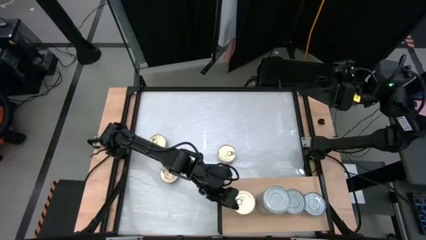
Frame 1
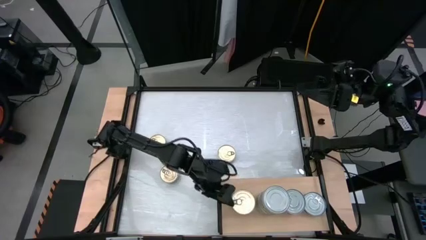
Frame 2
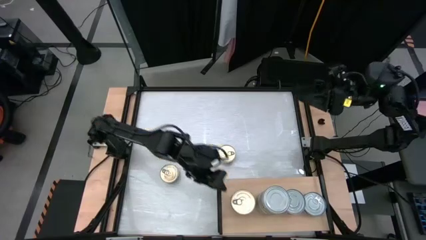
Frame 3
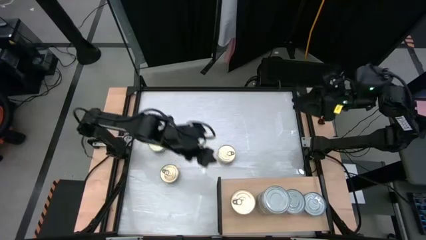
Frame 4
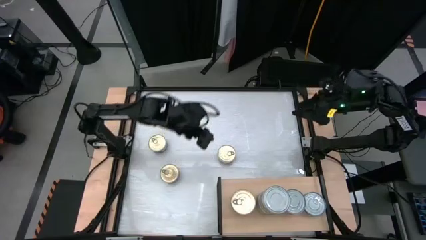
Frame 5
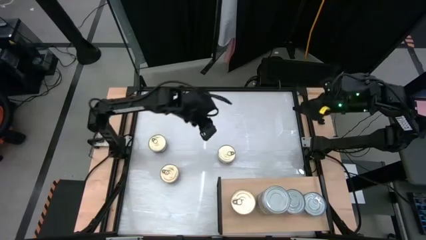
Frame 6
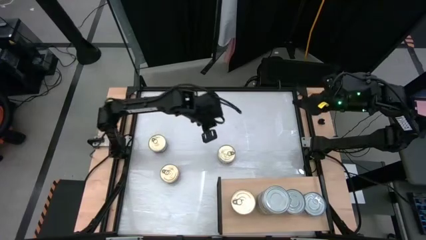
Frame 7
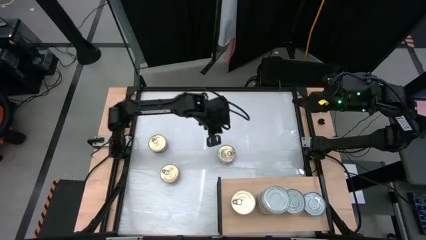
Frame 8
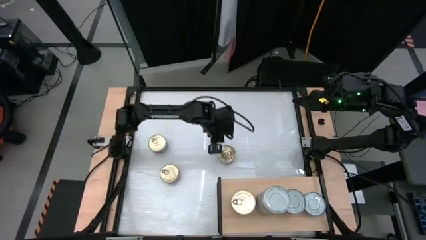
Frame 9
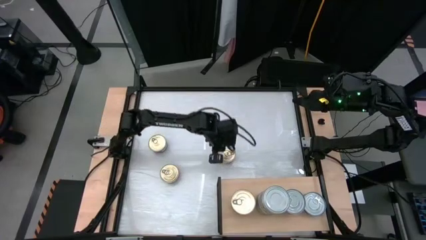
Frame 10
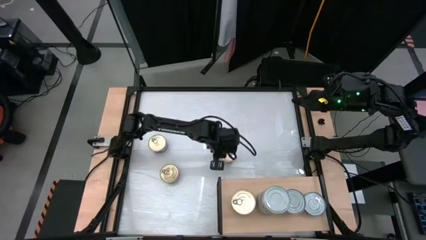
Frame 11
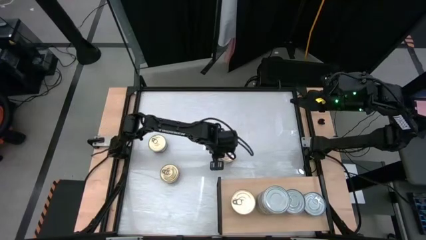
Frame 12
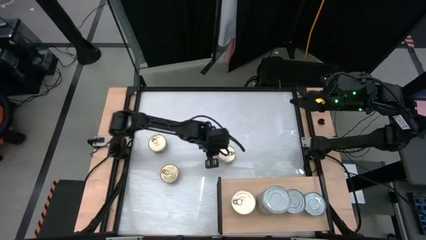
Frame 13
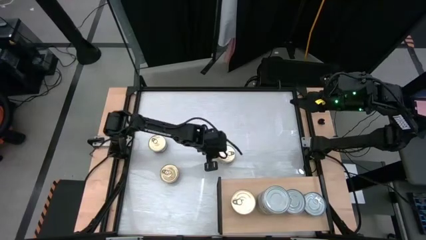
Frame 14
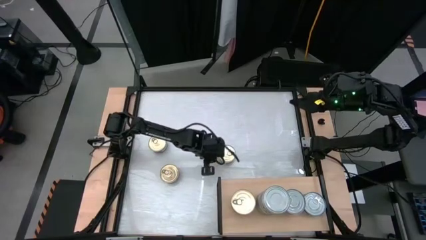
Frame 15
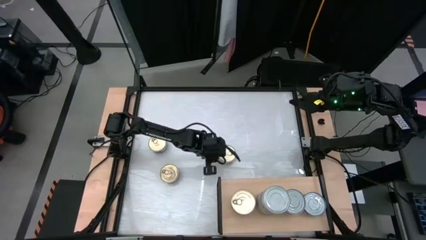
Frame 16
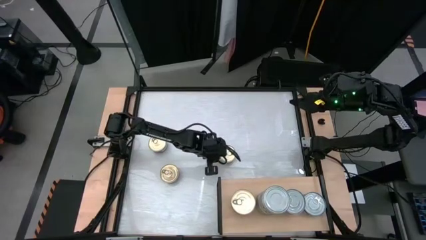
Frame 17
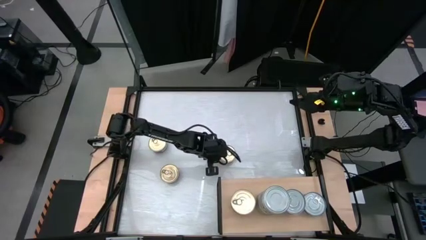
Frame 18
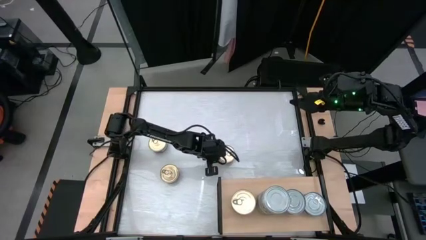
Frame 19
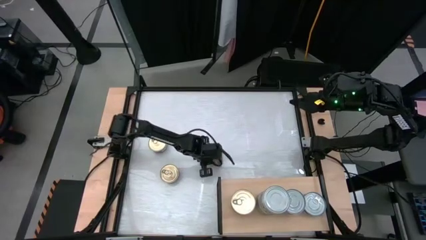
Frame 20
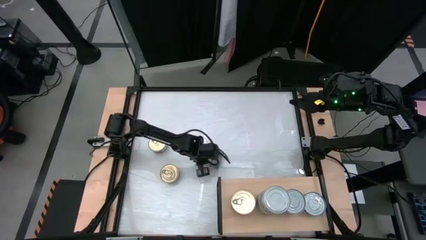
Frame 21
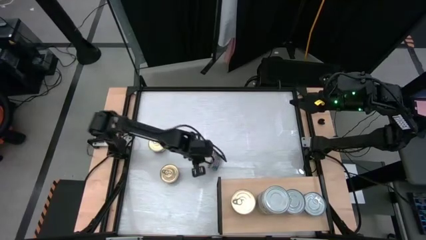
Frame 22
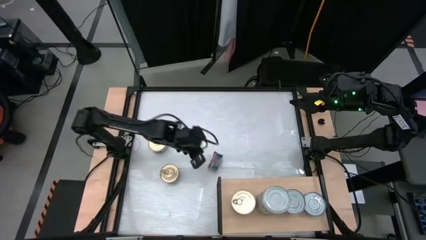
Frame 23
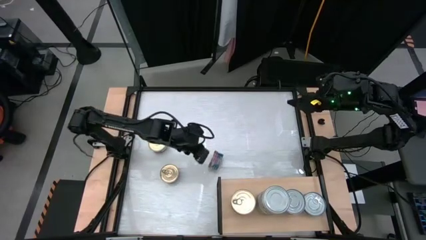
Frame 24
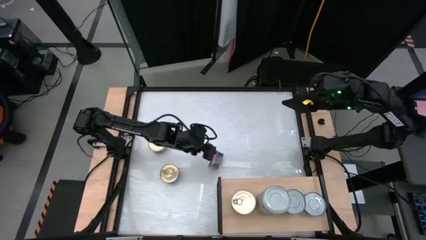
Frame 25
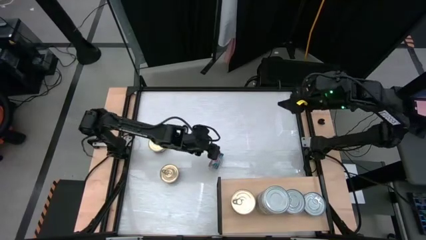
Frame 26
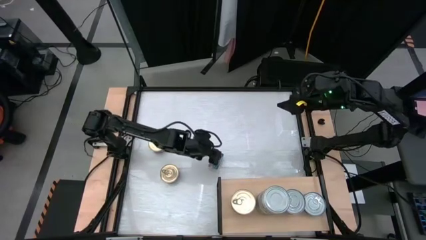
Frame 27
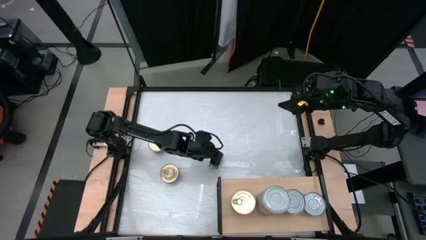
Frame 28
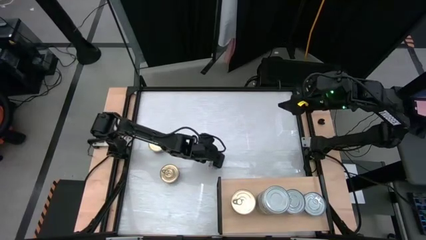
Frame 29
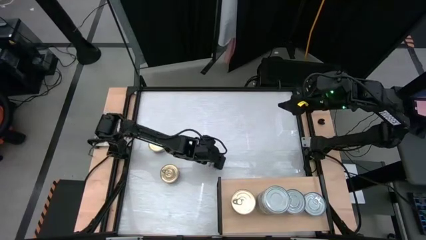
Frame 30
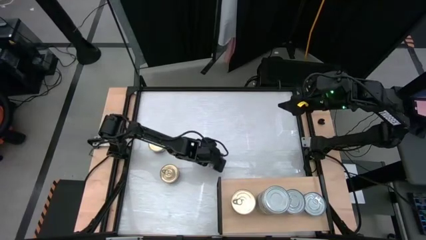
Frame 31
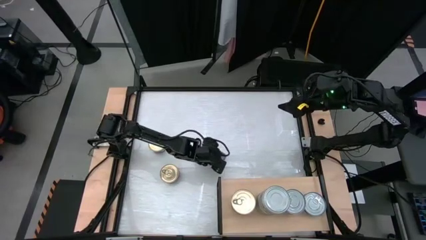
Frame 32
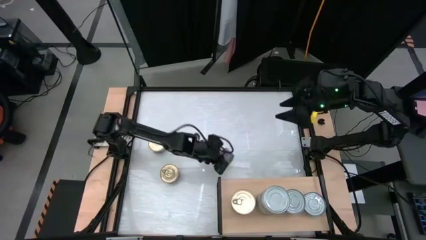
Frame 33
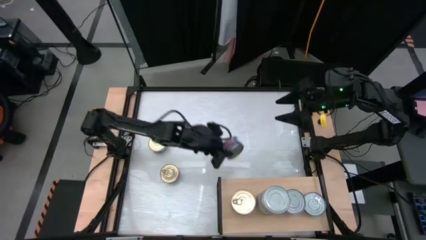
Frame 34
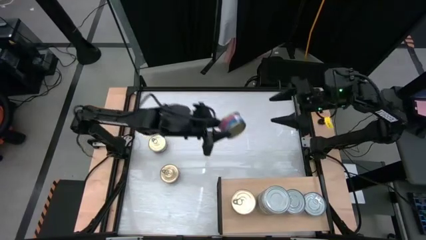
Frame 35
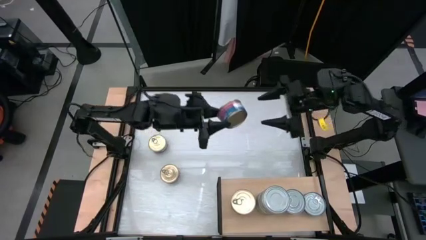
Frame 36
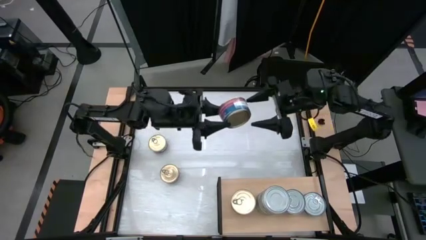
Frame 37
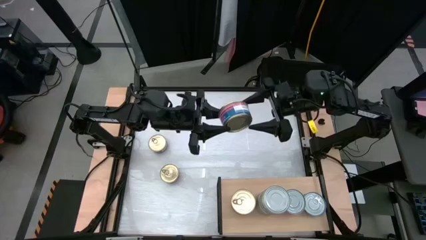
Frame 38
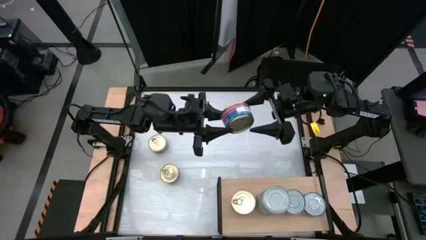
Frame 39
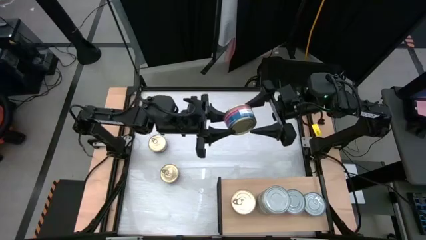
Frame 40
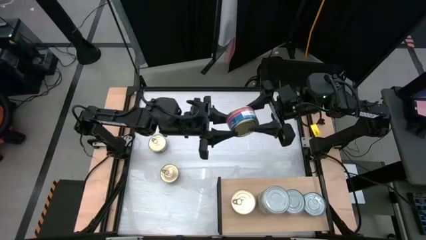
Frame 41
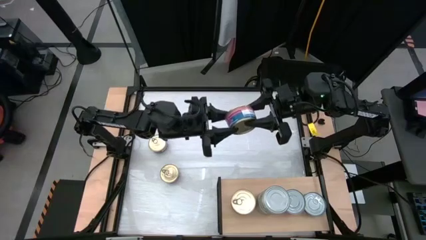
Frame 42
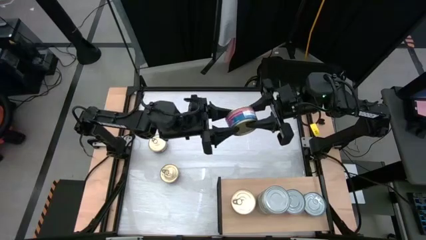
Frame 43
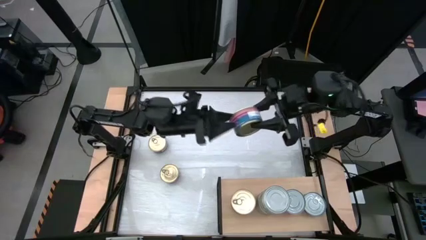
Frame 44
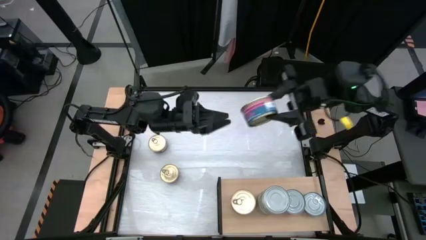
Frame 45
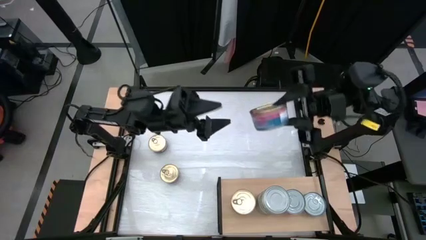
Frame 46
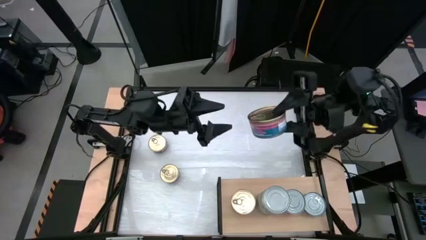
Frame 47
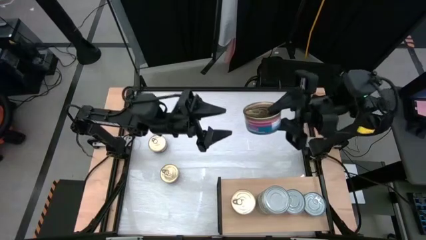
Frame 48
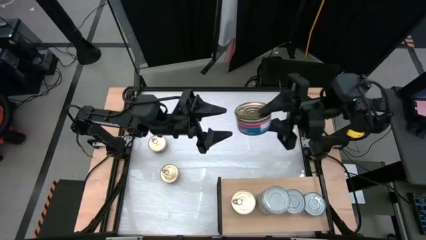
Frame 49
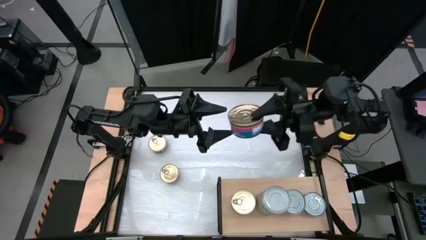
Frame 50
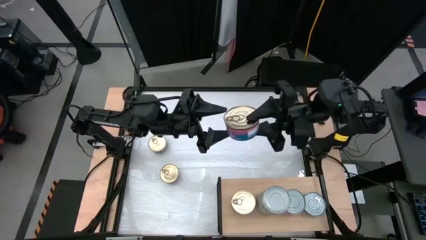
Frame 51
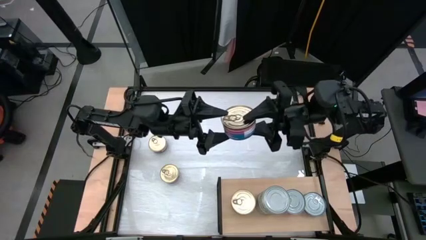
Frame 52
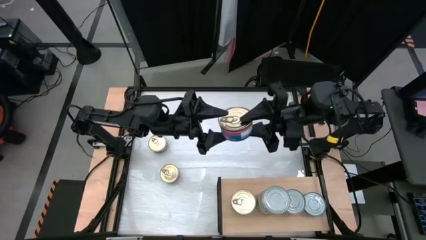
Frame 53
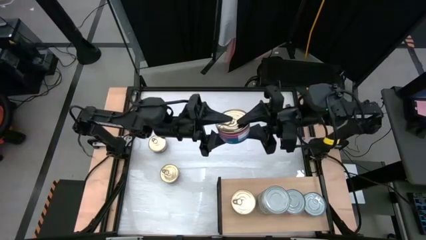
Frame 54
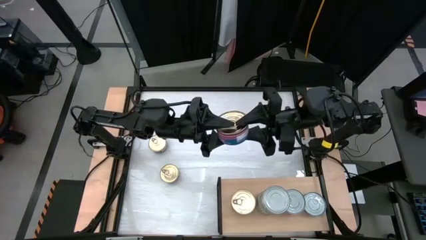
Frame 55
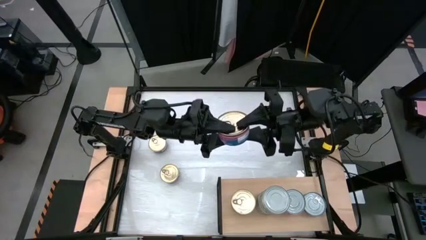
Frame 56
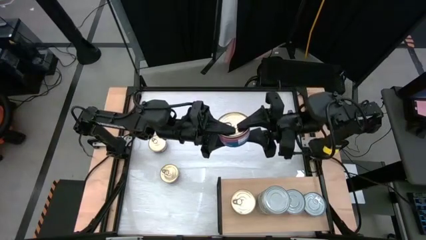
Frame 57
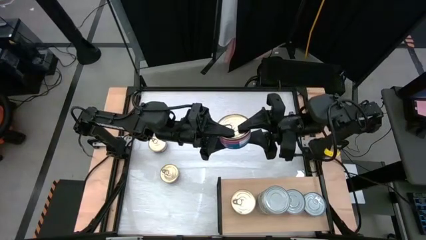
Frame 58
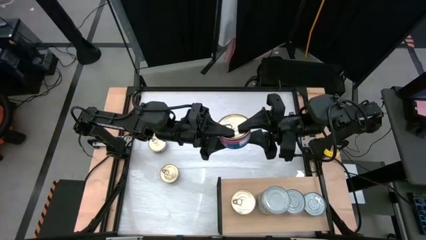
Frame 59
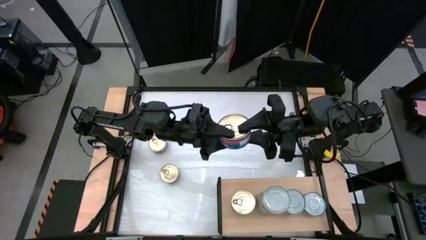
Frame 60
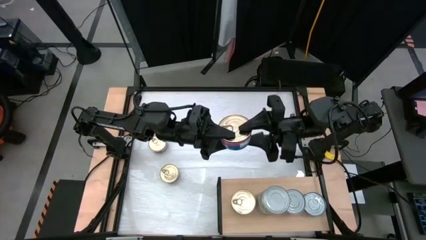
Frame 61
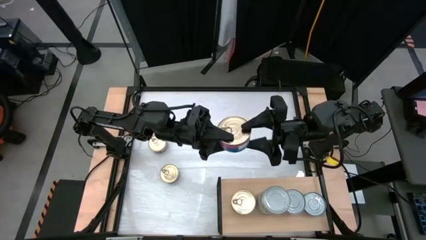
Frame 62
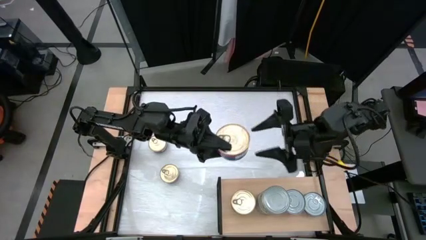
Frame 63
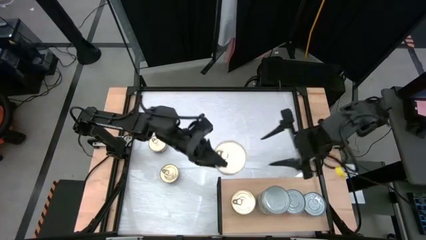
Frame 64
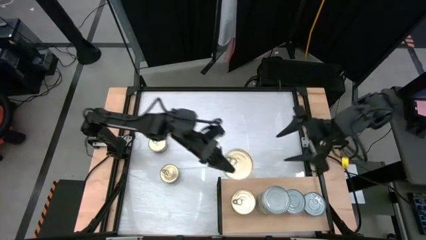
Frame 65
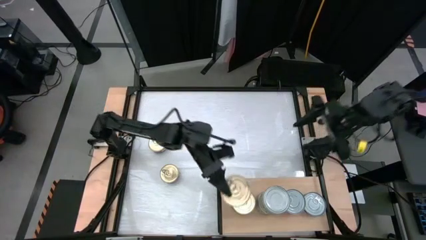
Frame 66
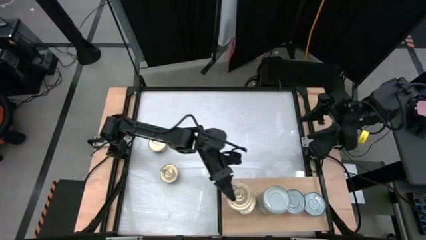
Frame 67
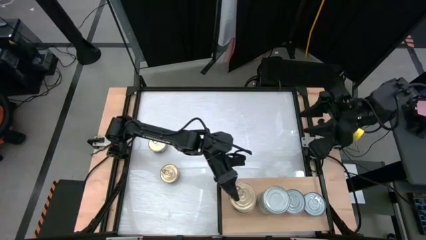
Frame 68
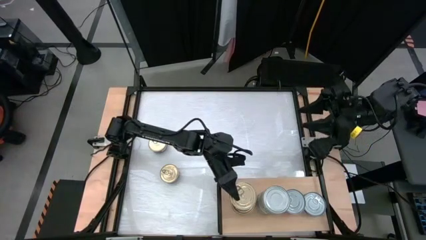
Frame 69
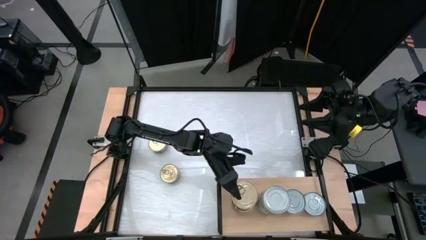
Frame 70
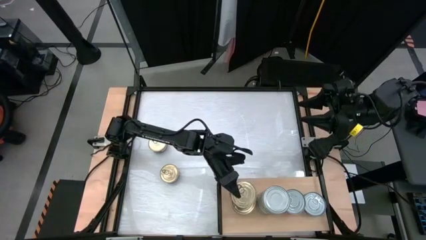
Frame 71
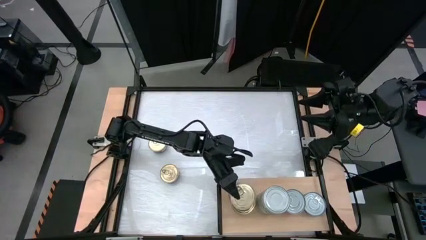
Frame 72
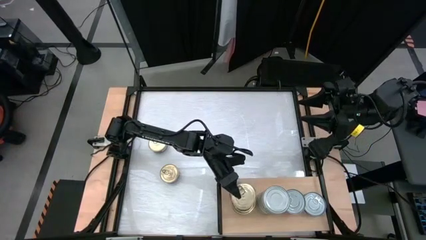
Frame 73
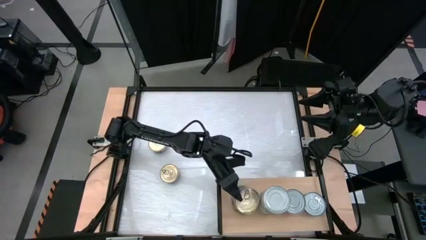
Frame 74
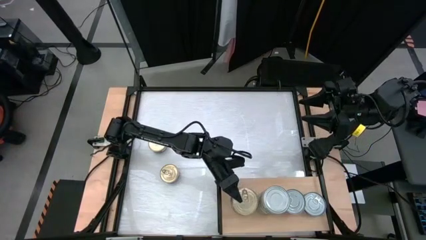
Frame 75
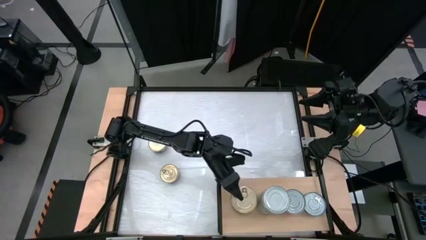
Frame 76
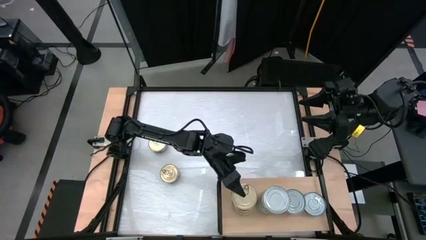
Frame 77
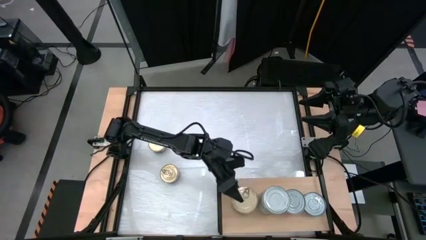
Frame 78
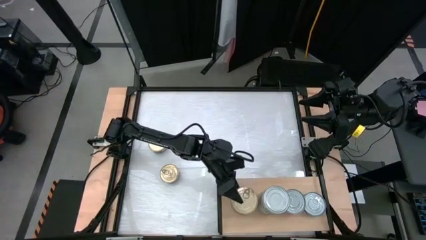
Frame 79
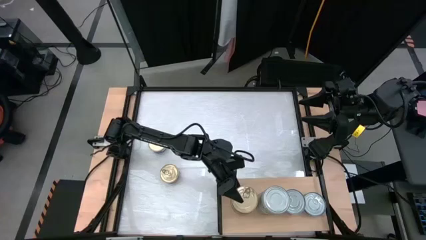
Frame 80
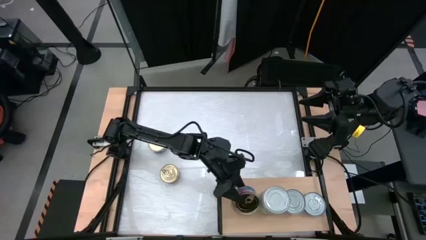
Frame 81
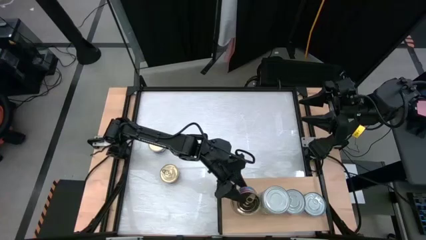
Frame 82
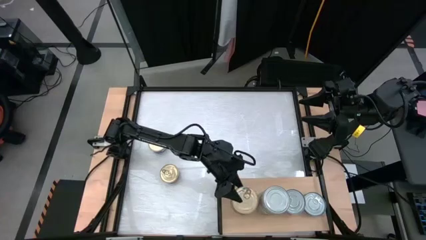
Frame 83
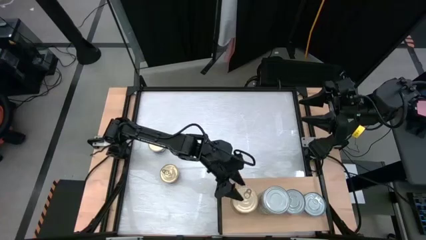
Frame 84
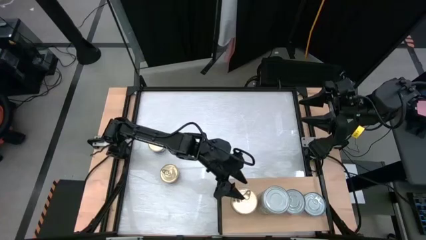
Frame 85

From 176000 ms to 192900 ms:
Task: Stack canned seafood by type on shelf
Stack the blue and pink tuna can on top of the other blue and pink tuna can on the shelf
